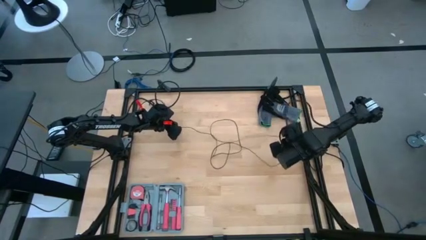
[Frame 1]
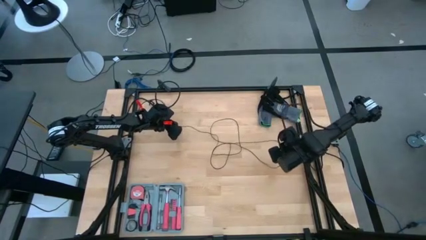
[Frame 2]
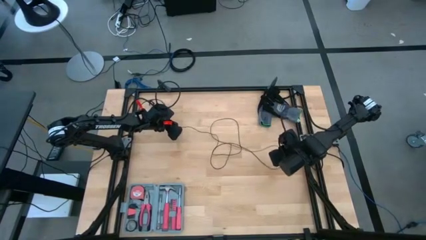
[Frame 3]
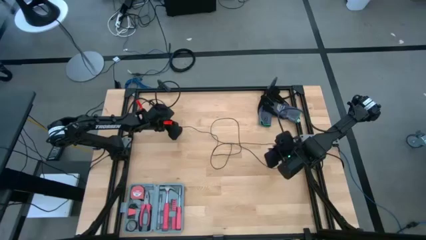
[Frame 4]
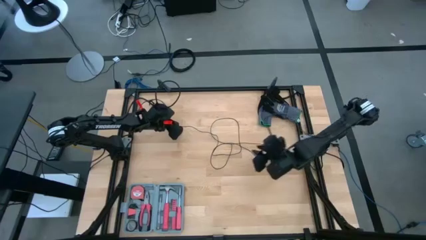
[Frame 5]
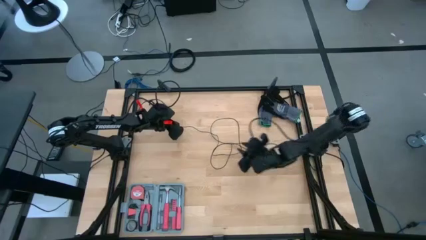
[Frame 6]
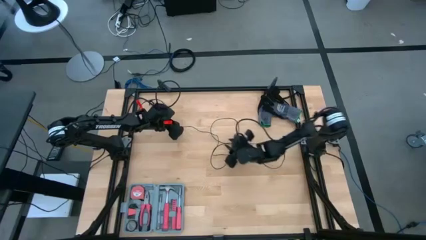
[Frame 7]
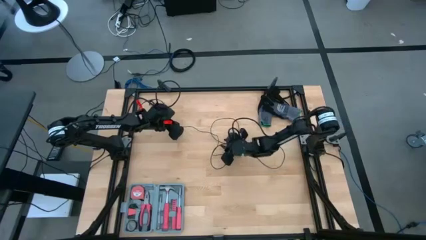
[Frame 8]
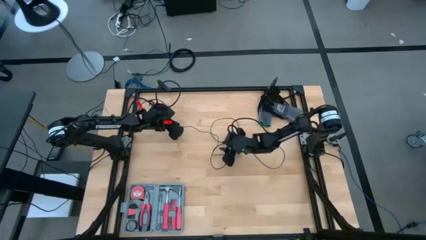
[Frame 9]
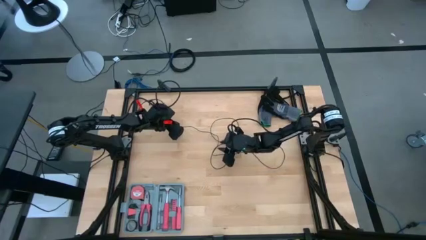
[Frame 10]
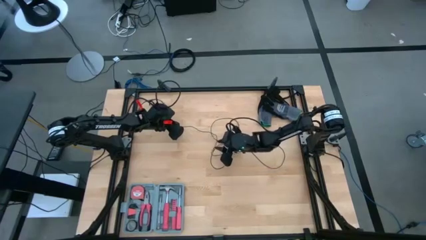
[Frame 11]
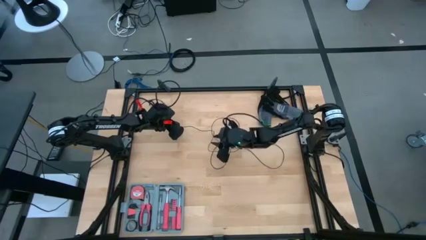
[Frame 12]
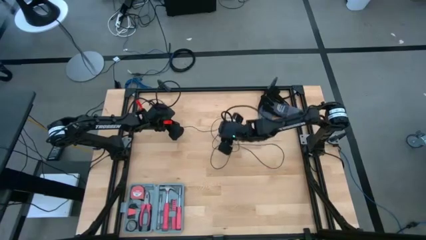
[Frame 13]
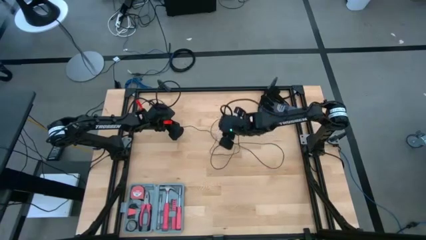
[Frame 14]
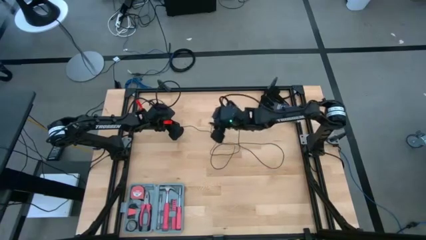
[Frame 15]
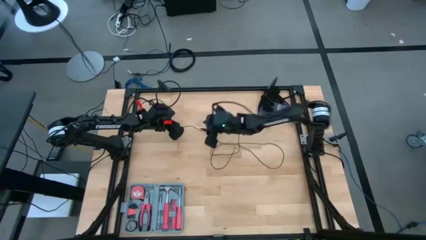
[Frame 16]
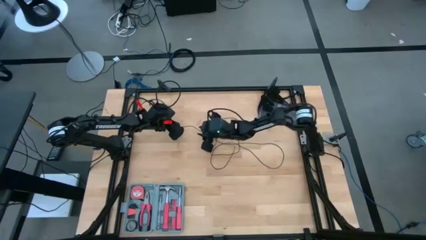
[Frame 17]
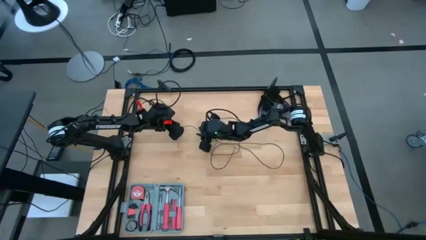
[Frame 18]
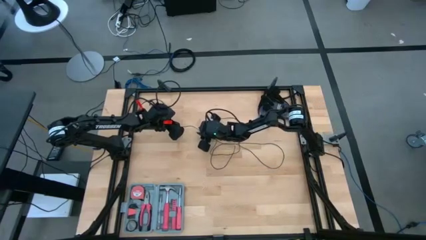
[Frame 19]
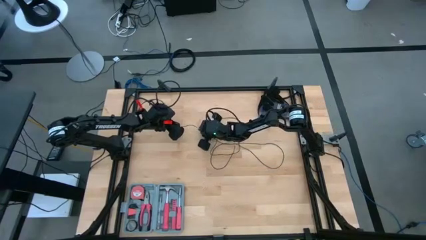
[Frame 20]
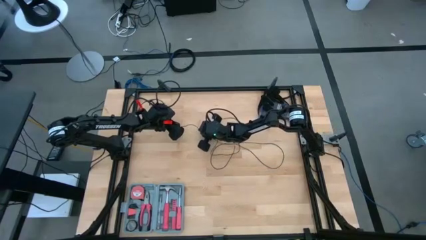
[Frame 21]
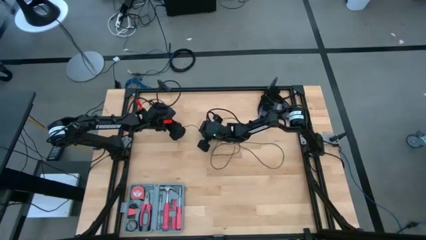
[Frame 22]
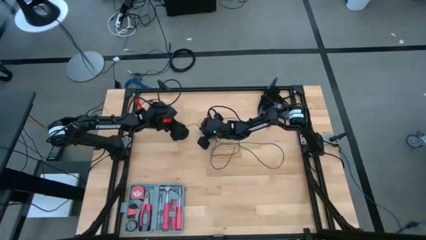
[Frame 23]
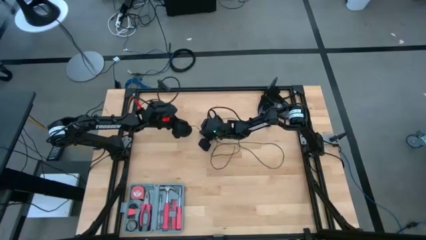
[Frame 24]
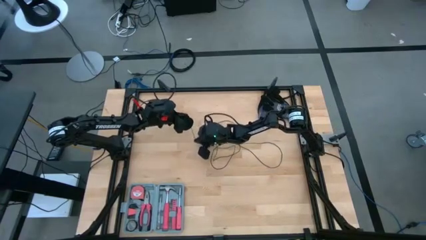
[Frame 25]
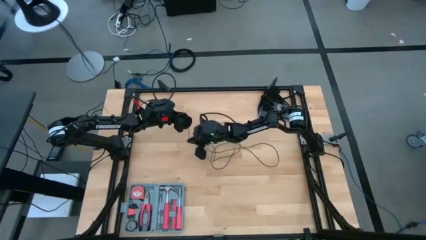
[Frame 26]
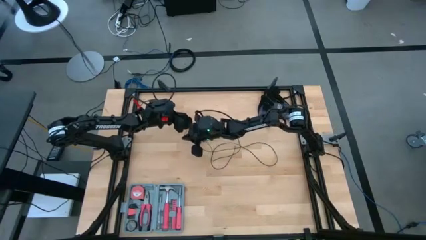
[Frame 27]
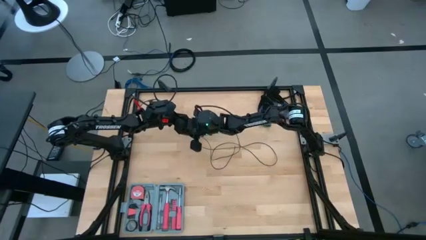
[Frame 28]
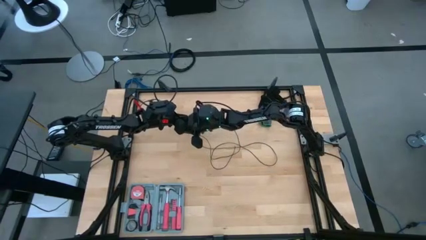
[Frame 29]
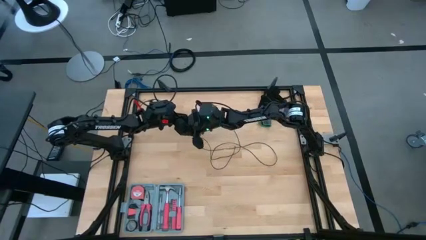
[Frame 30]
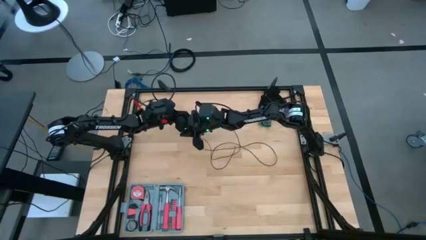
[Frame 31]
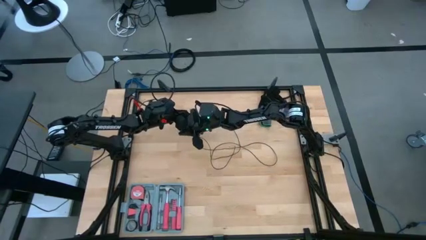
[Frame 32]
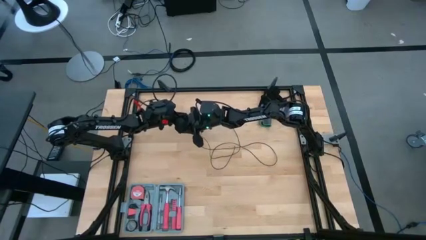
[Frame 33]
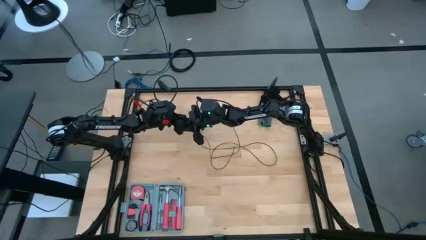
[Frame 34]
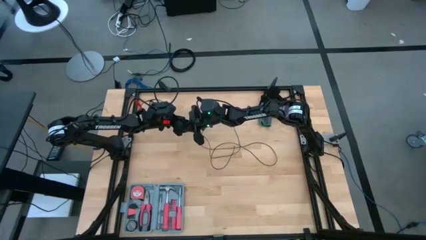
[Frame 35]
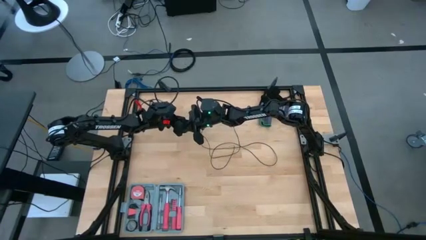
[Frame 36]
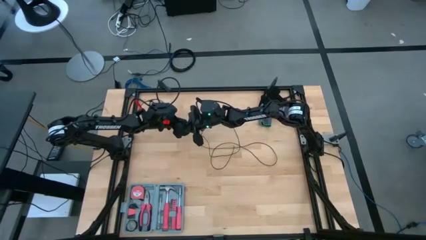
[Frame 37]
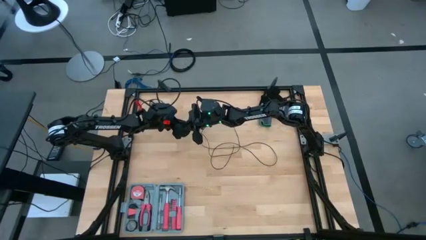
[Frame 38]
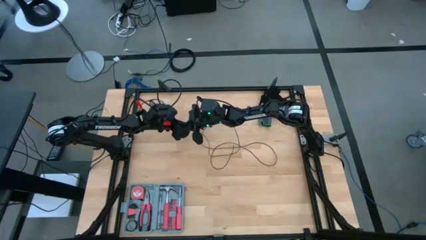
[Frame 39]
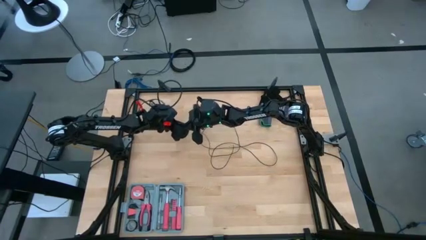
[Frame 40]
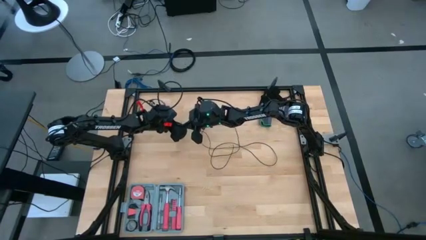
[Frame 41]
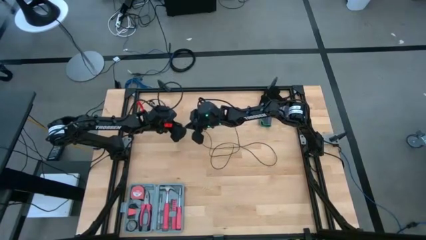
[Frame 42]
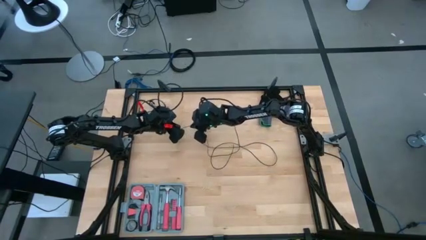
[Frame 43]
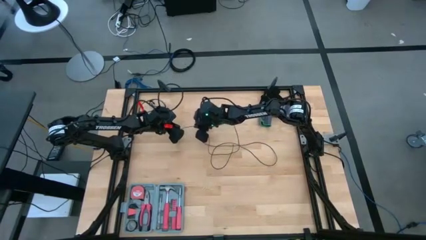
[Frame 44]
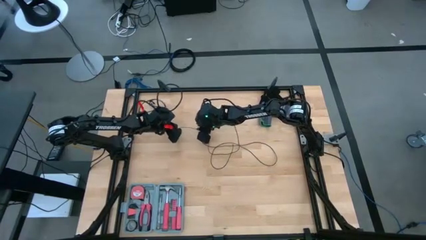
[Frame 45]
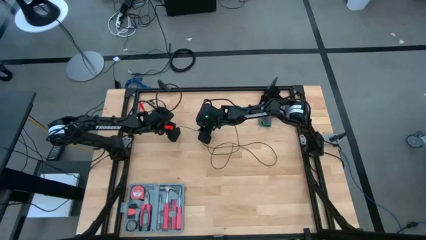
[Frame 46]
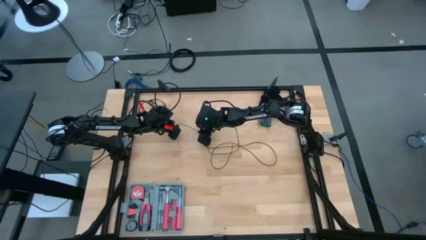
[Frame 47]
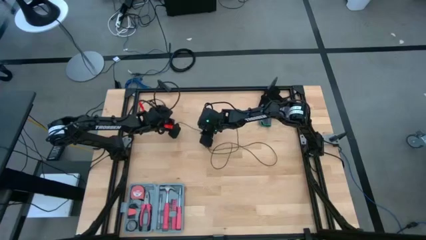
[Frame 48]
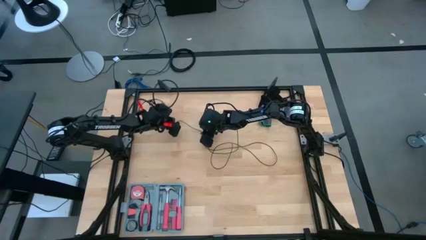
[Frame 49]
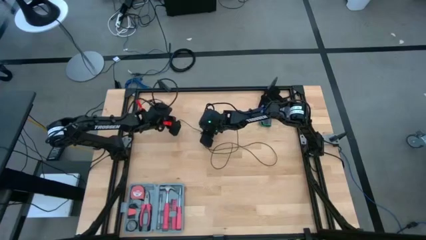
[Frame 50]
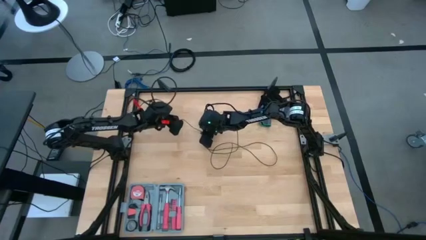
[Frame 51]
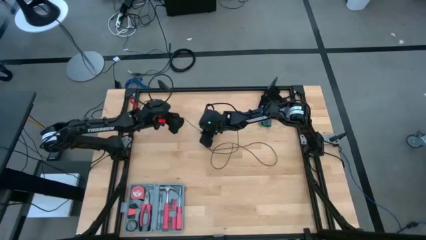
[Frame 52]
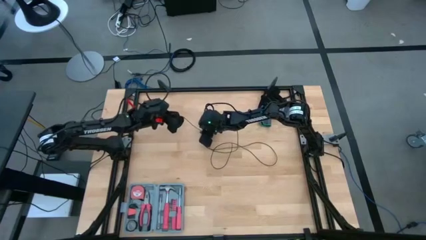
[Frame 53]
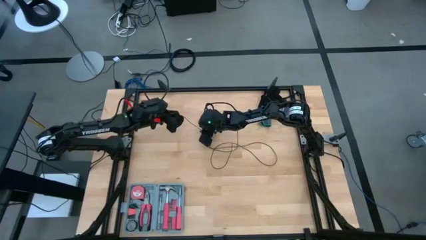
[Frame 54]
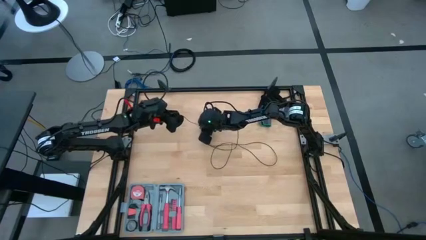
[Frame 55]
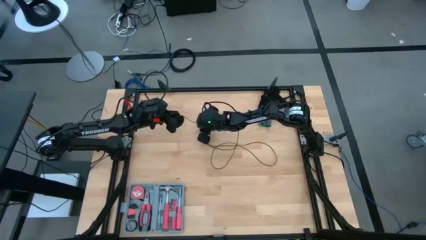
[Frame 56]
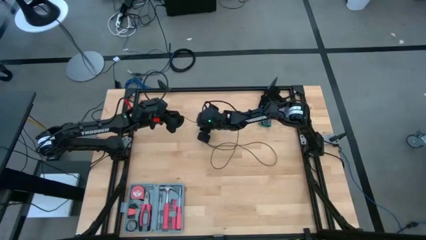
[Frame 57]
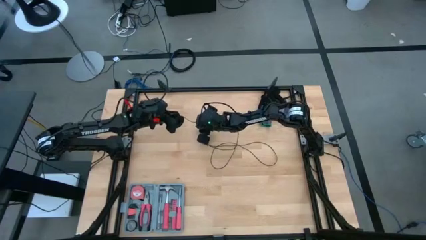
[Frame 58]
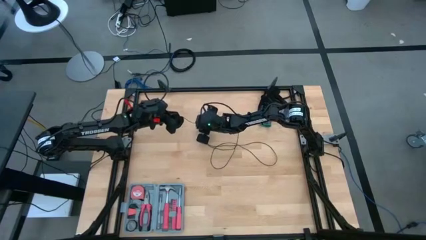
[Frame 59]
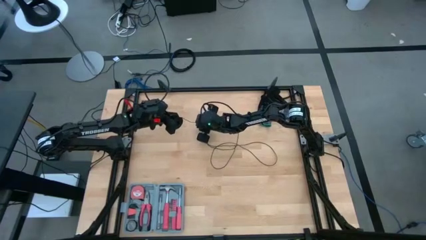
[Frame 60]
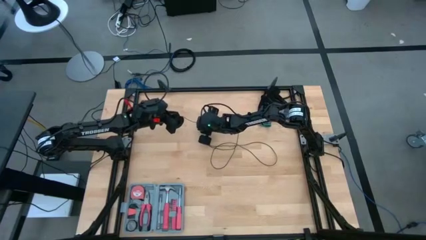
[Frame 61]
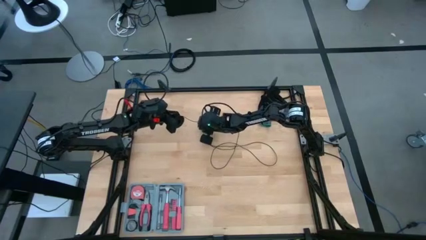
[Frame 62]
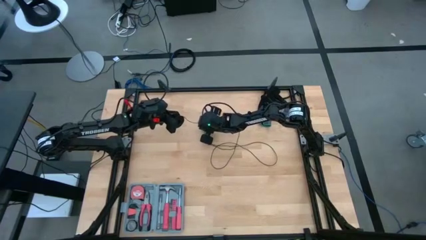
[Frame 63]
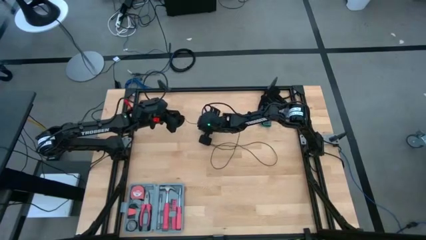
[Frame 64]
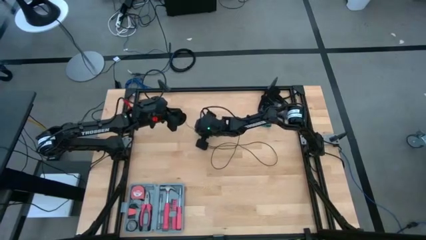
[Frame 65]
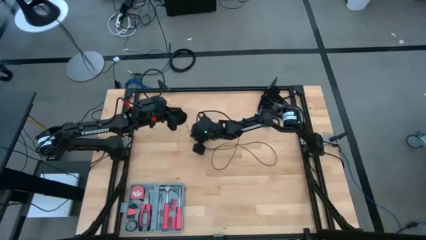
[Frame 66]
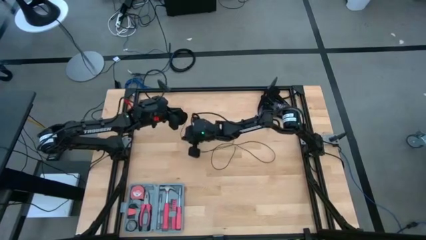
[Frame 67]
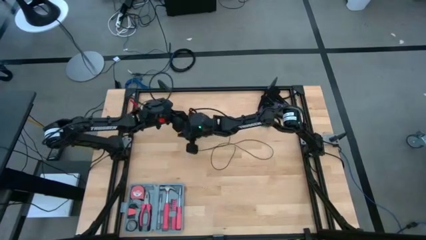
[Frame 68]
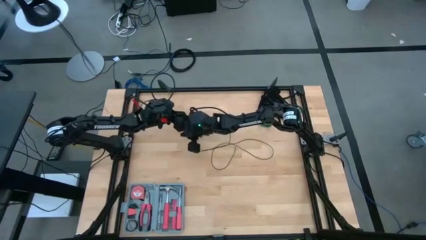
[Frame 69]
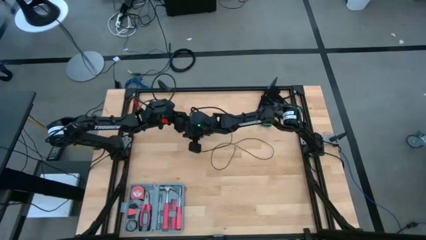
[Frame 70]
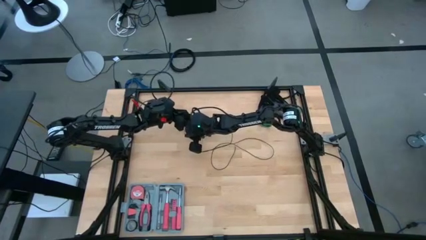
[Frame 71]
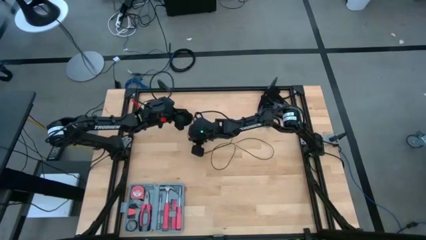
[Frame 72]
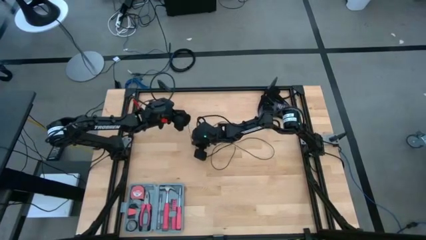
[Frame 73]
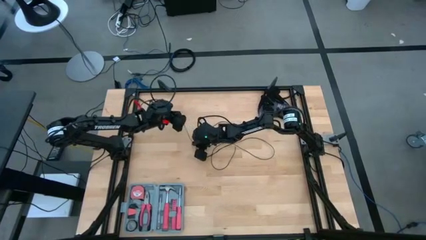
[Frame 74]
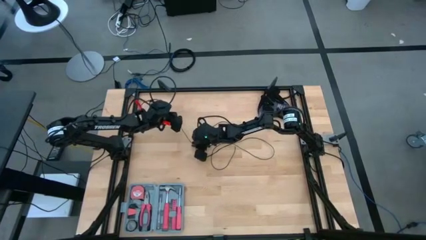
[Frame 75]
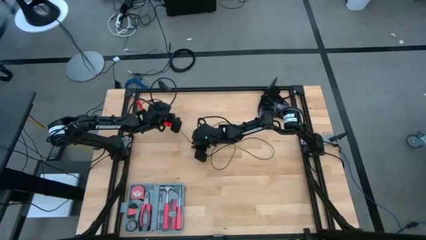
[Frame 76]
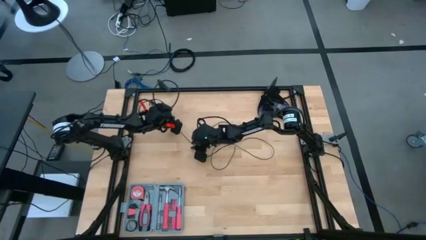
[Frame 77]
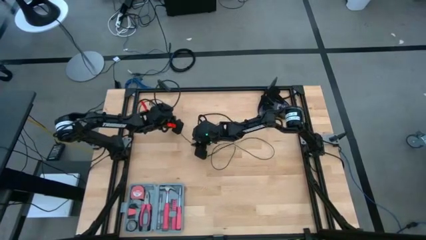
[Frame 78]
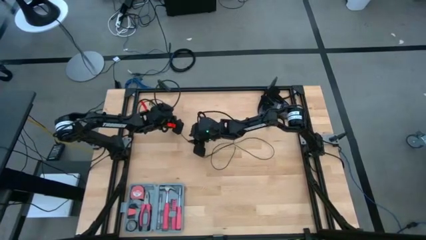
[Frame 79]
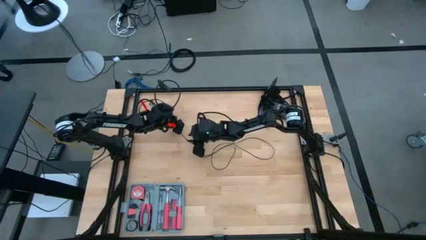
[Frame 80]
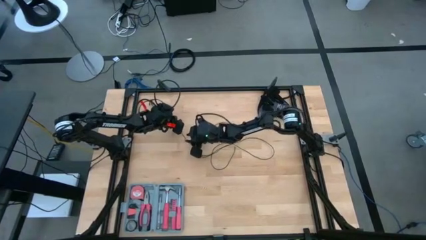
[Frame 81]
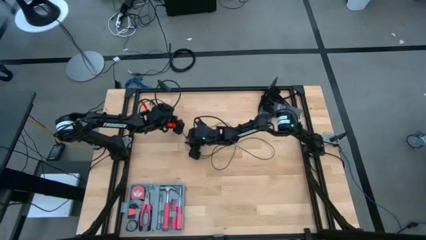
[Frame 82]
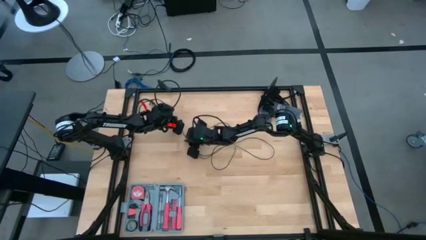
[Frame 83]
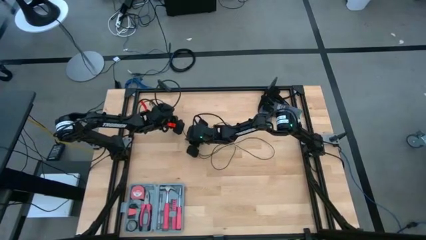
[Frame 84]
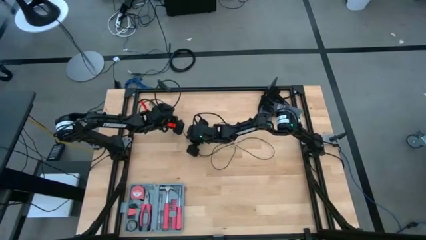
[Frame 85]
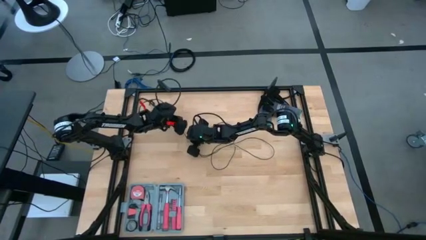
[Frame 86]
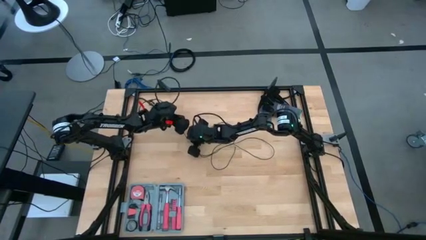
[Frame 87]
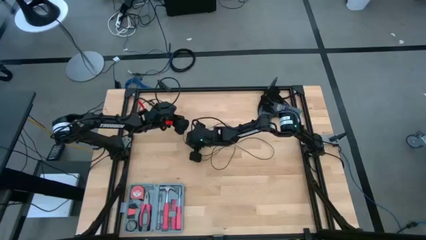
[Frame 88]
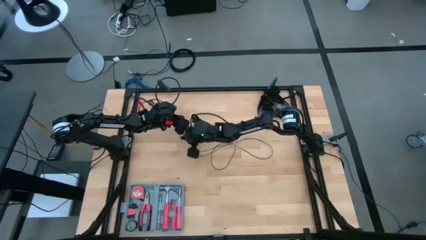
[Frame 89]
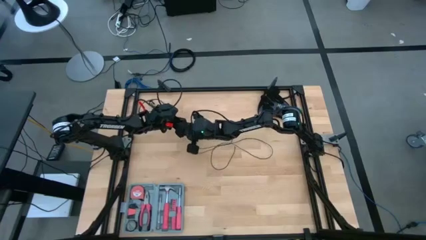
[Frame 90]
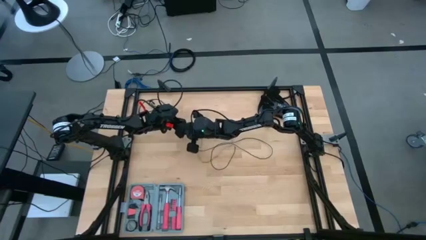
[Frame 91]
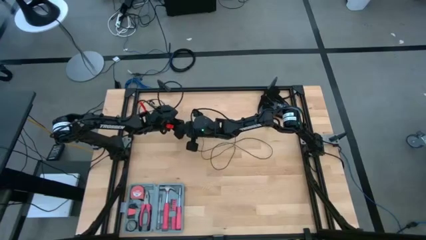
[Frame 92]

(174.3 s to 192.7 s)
Task: Coil cords
Coil the black wire onto the black spool
